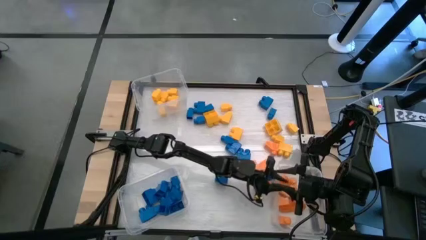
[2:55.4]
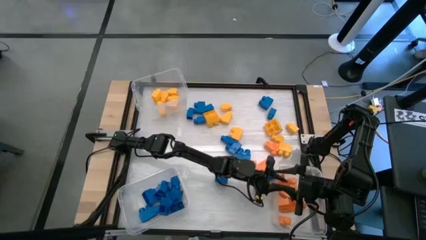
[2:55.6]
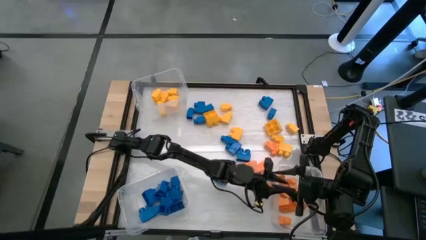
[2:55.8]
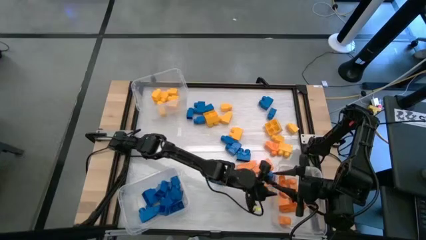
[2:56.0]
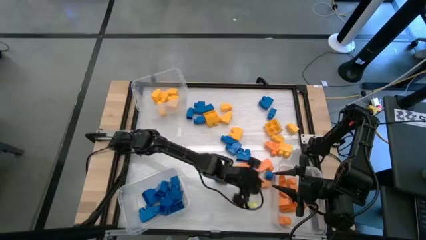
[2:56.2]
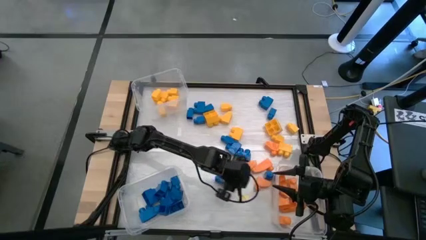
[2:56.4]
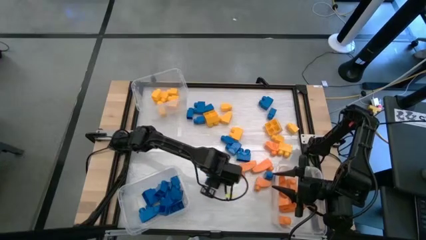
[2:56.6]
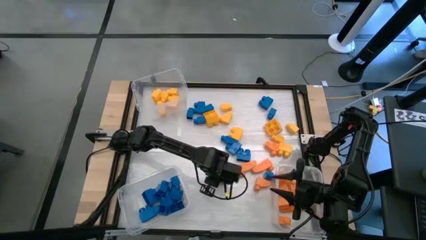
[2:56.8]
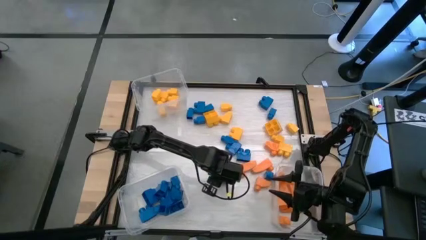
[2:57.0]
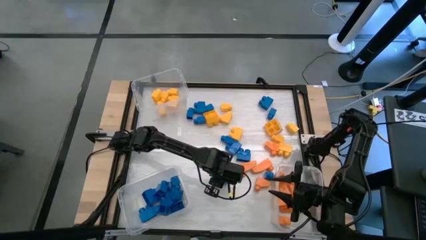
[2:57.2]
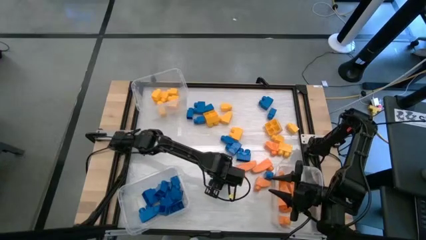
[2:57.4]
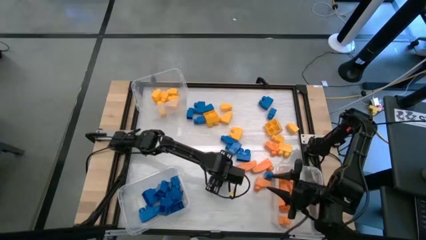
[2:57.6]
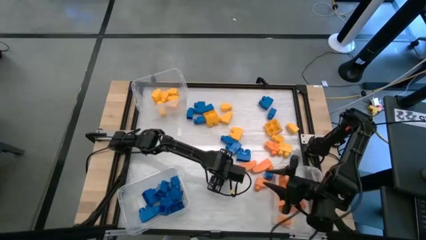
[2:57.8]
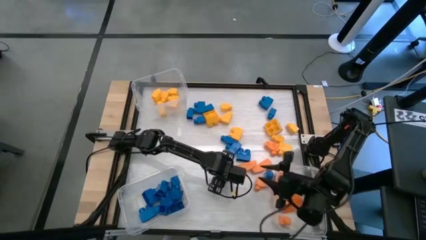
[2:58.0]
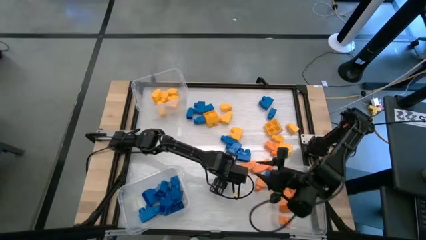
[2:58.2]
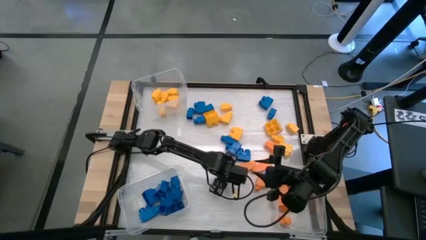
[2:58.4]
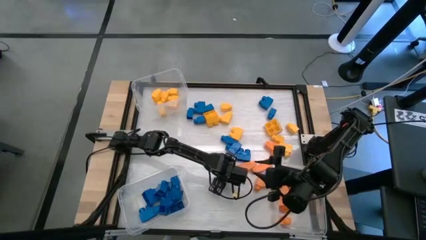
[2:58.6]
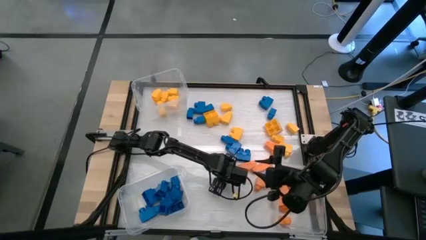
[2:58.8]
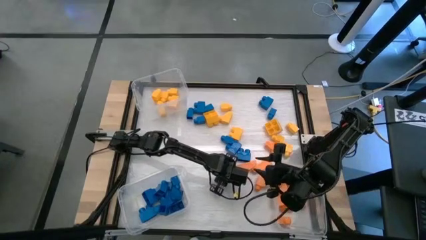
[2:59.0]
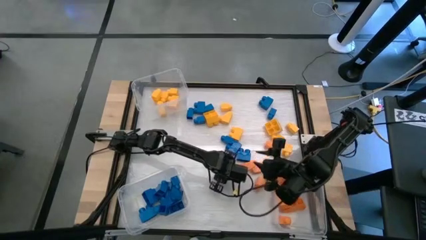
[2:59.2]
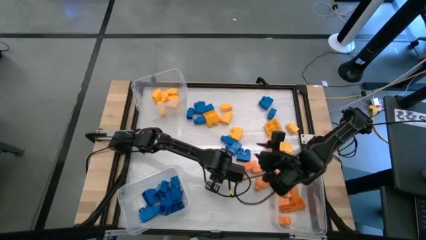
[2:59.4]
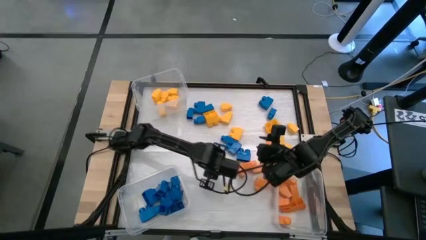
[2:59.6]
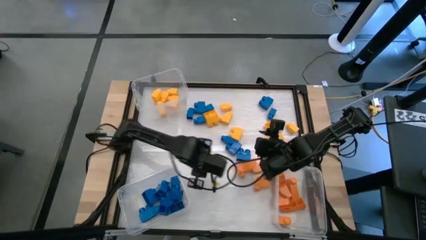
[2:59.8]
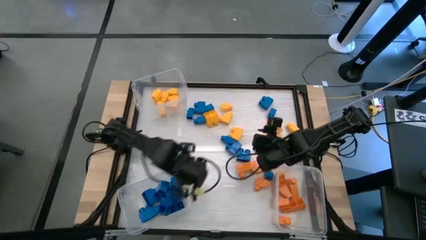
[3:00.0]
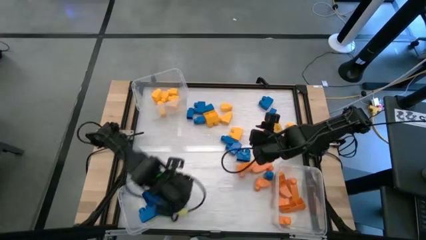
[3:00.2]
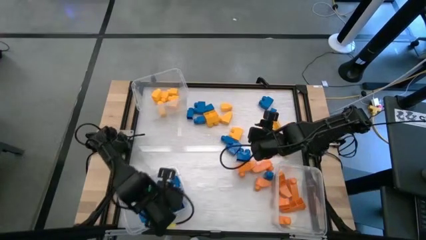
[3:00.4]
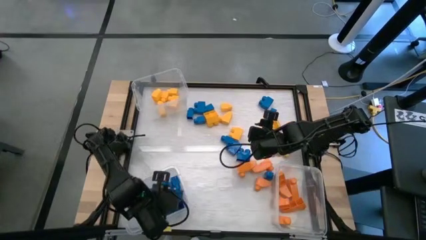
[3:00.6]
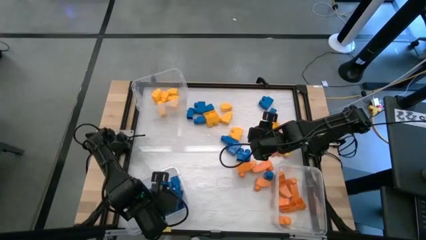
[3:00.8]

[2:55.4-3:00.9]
Task: Sort blocks
Put the blue game piece into the bottom left transparent bin

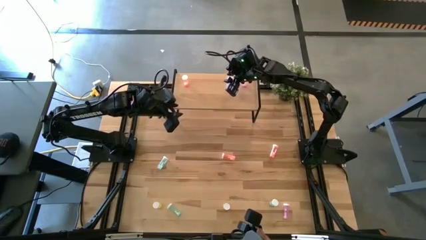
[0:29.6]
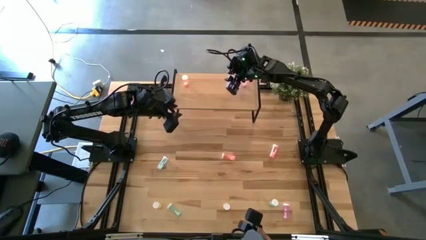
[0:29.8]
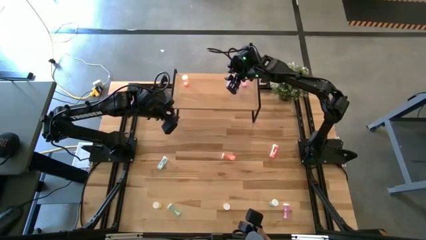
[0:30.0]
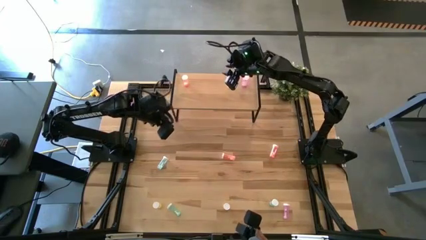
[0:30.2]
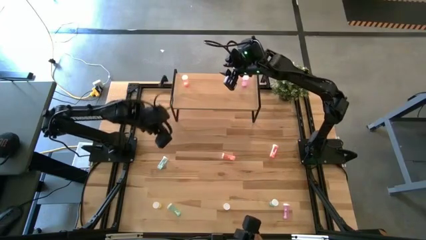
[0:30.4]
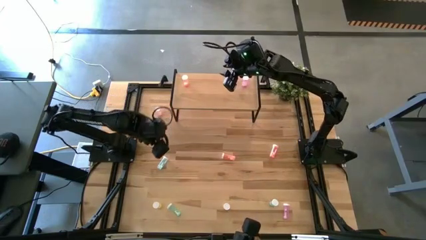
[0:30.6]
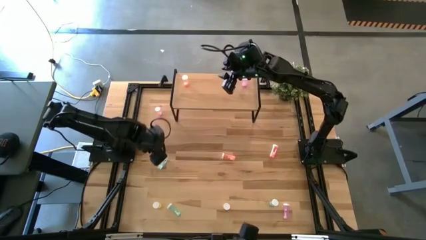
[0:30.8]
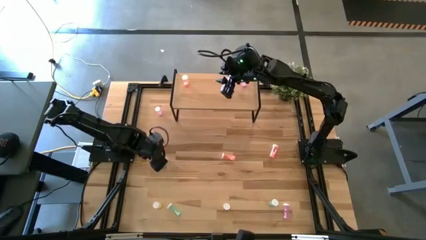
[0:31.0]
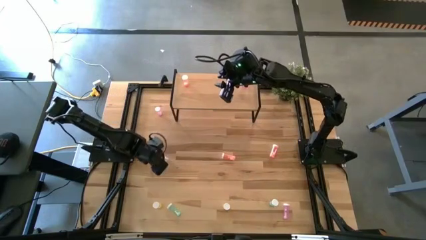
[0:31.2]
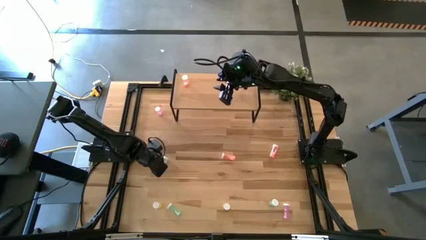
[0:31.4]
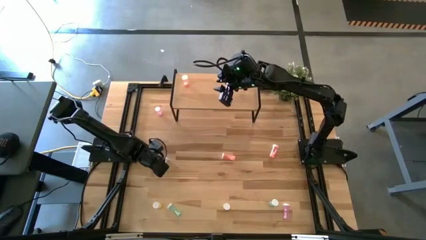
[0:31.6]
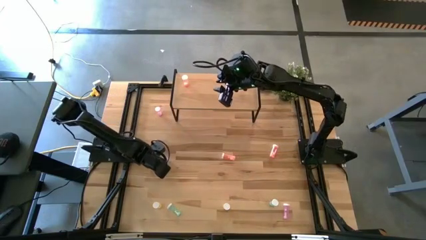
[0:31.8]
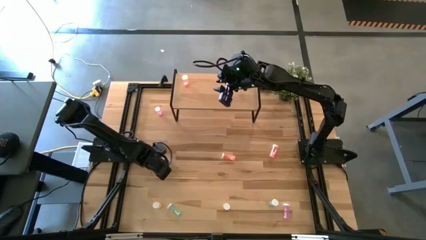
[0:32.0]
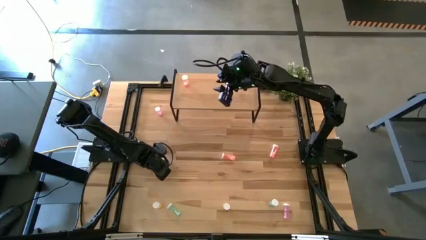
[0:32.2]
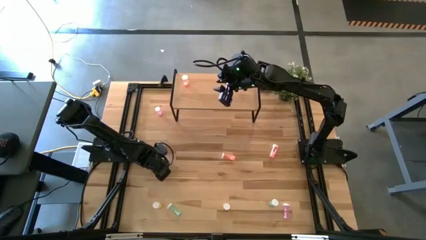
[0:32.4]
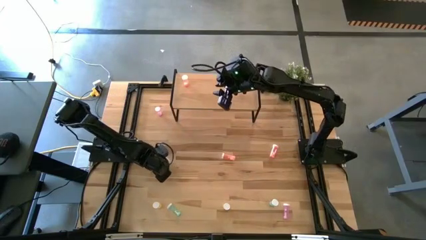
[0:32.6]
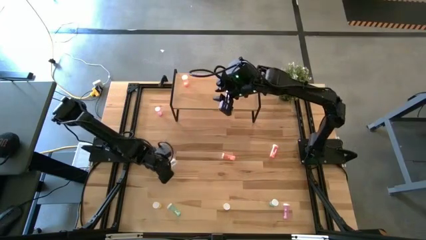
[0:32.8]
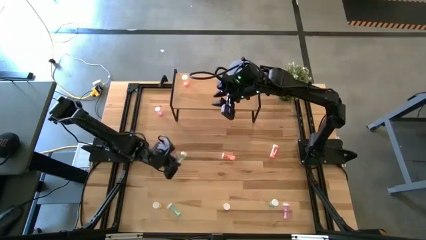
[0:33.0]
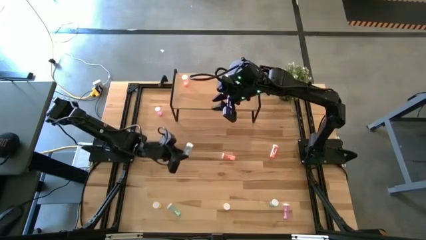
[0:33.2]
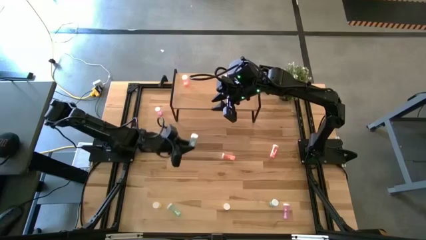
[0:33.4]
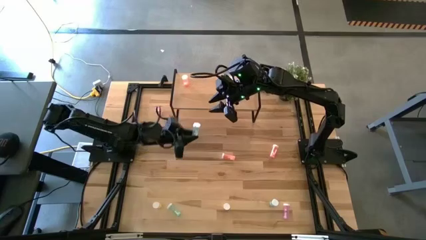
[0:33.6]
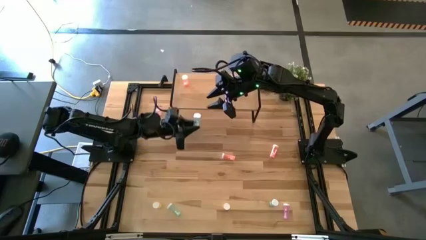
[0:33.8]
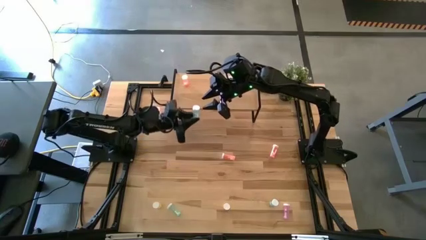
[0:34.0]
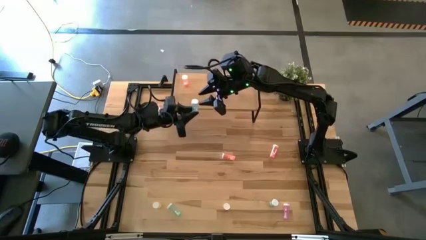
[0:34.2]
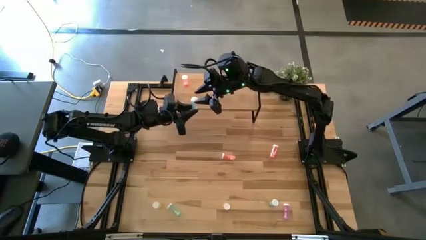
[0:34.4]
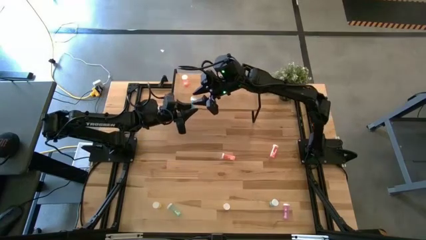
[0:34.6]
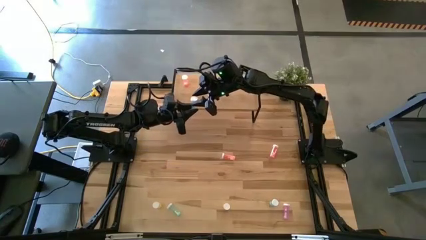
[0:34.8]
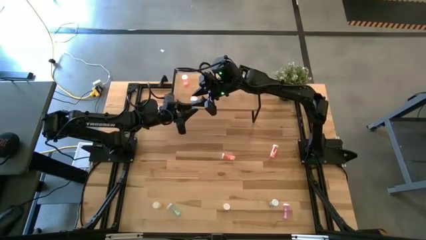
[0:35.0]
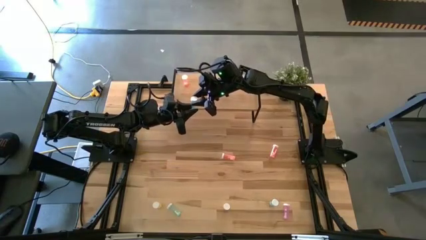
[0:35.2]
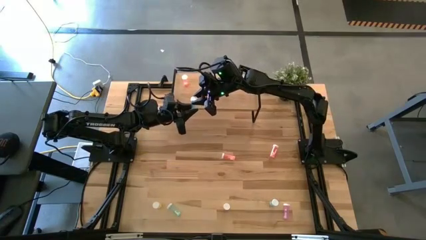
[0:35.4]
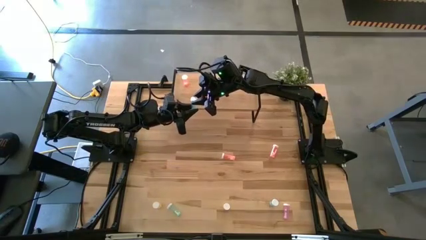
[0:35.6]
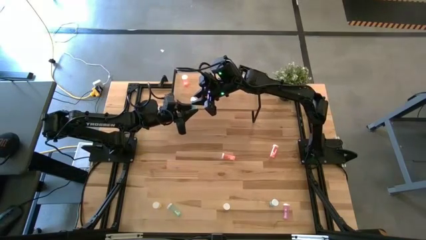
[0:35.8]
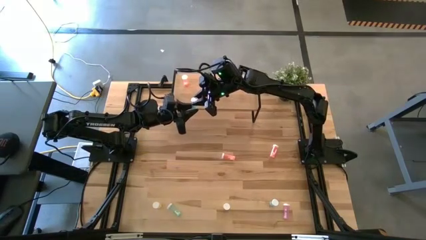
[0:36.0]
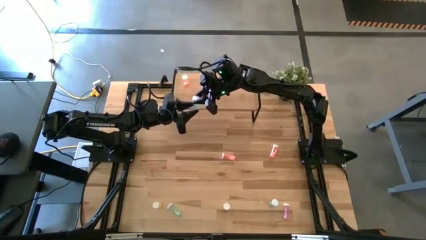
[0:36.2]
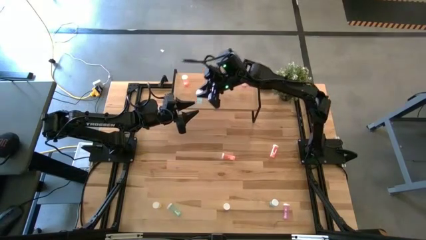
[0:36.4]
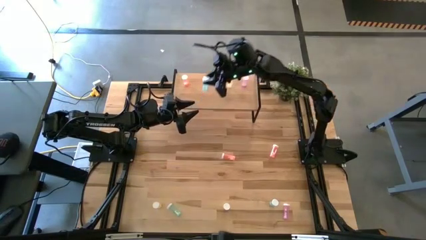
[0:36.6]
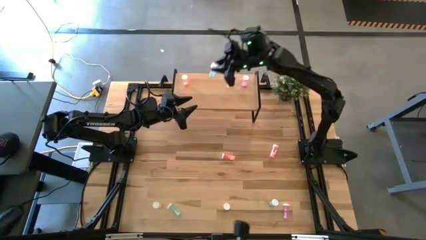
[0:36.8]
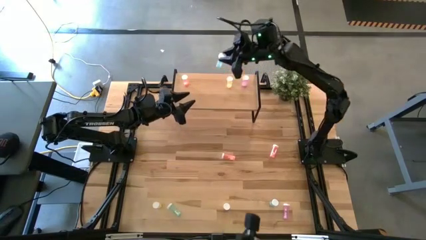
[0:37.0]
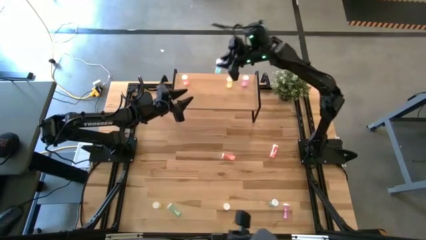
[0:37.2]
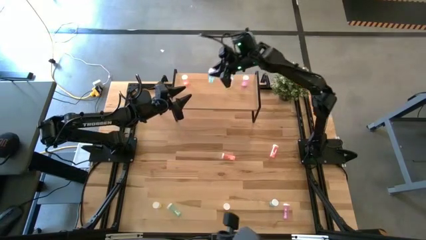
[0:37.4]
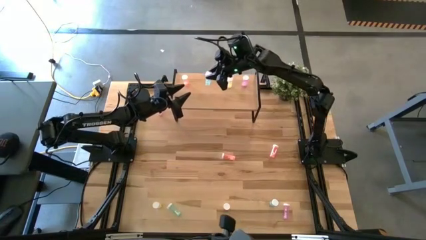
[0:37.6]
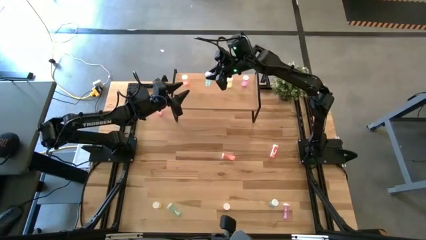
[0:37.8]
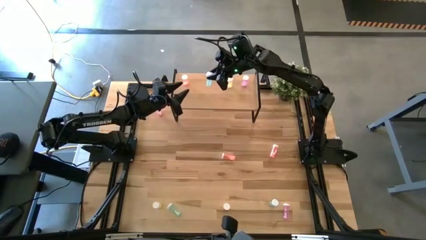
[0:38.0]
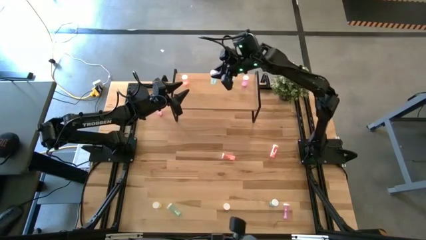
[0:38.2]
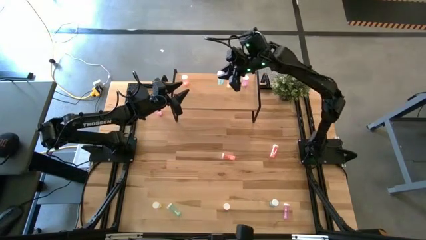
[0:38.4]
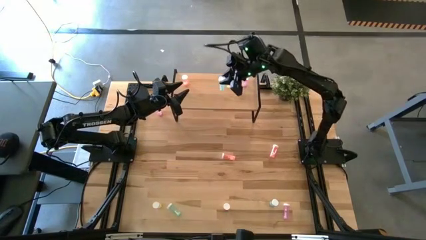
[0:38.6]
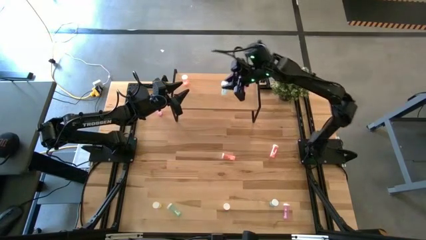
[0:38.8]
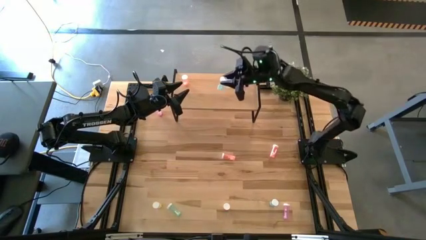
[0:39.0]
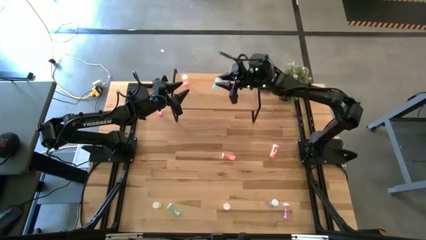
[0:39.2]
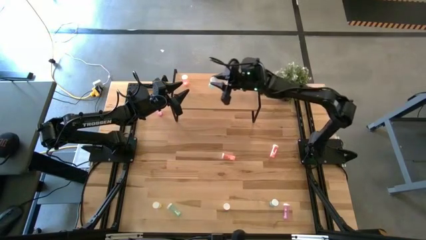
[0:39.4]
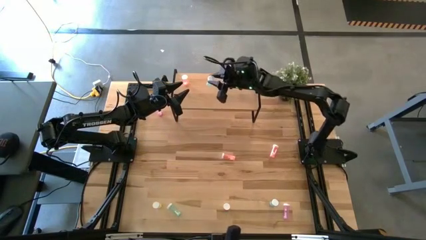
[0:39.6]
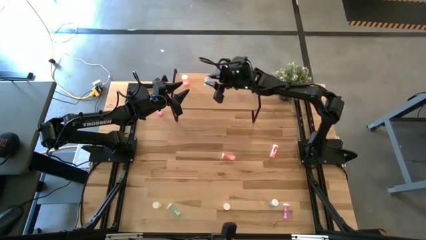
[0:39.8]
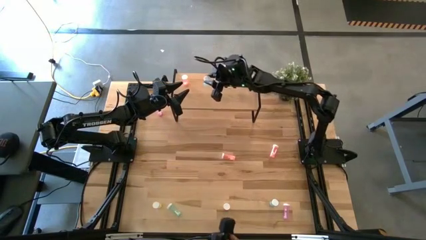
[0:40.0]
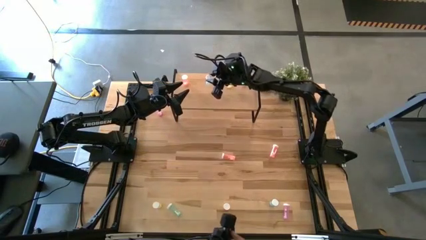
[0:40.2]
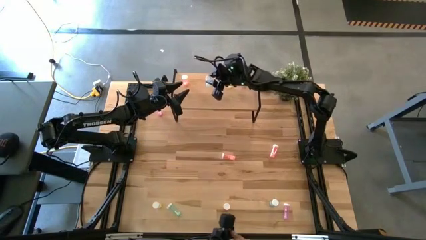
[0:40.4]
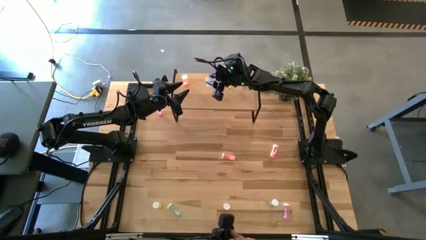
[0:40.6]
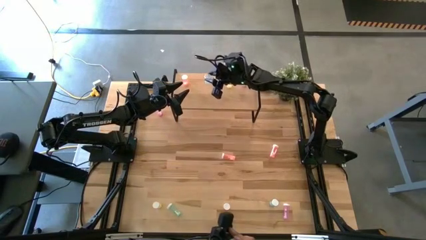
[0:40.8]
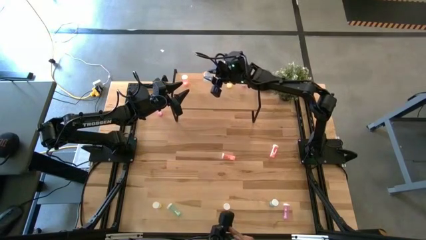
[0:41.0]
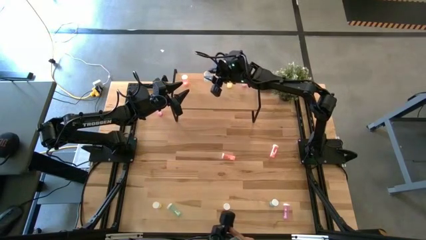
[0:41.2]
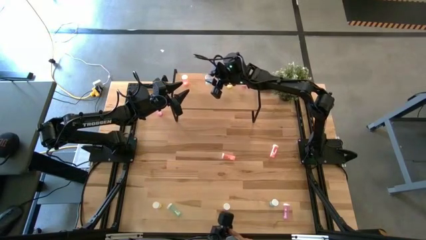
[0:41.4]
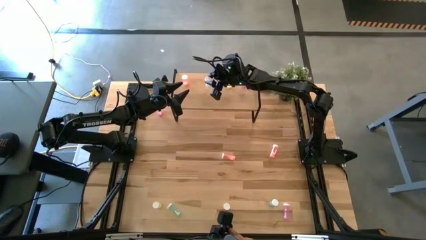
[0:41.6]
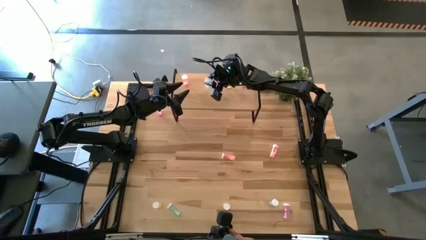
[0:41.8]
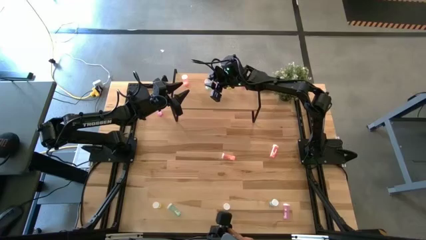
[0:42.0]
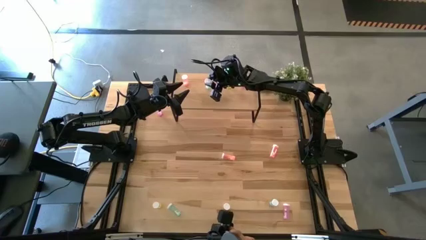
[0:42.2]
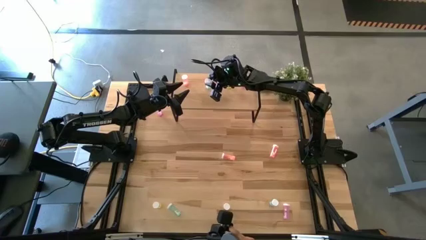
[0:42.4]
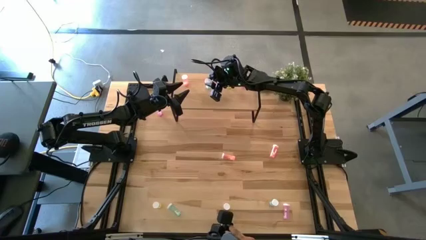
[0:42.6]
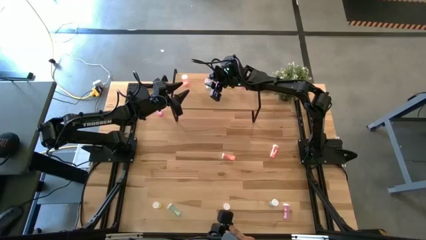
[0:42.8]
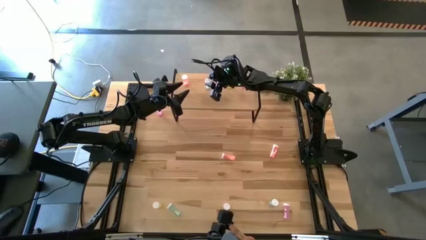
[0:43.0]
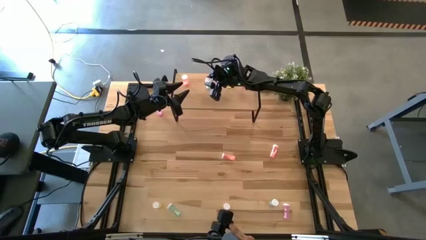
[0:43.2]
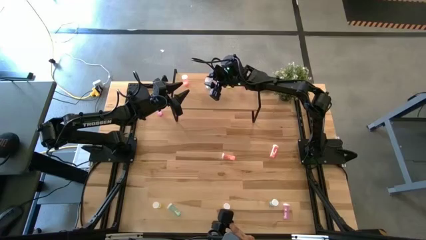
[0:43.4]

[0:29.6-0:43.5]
Task: Pick and place medicine bottles onto shelf by color
Put the top left blue pill bottle on the shelf
